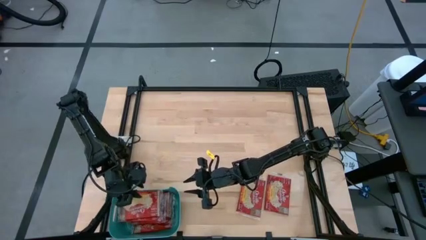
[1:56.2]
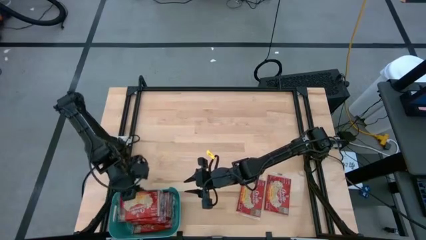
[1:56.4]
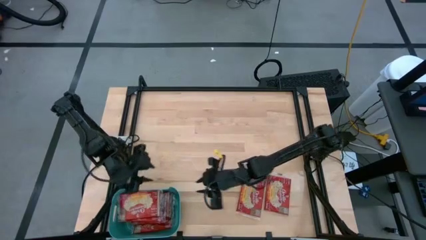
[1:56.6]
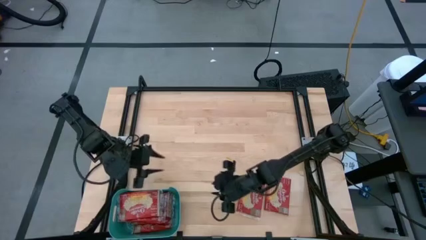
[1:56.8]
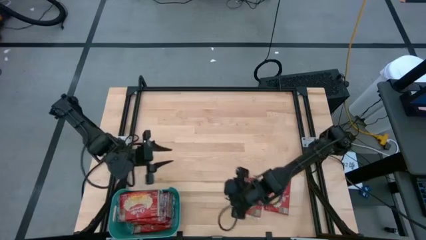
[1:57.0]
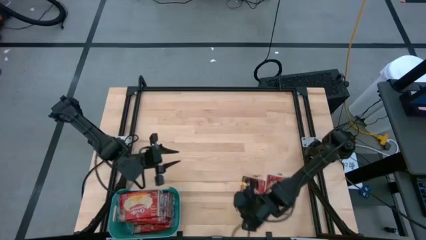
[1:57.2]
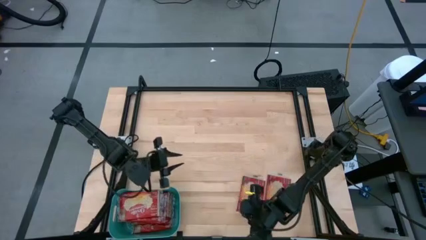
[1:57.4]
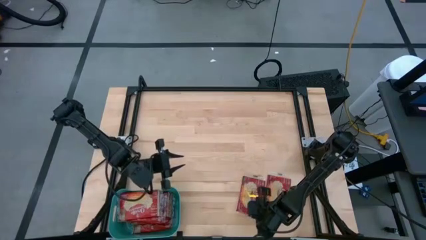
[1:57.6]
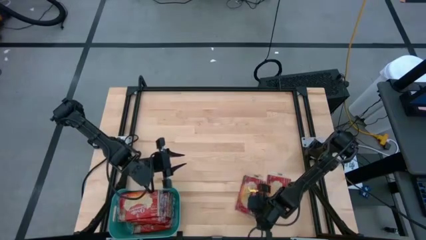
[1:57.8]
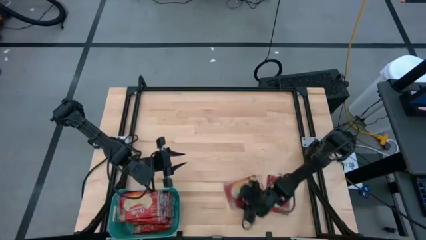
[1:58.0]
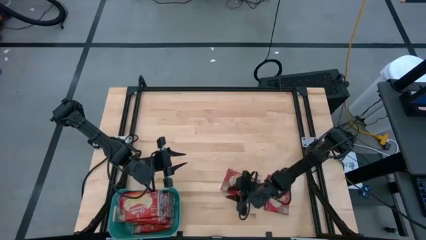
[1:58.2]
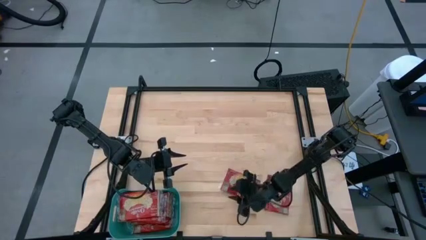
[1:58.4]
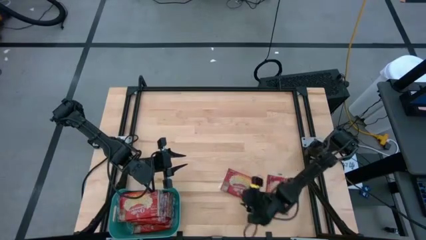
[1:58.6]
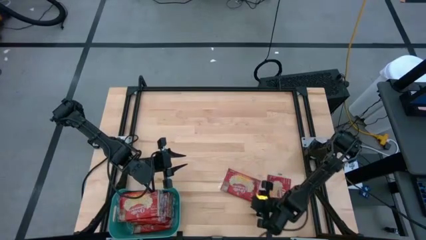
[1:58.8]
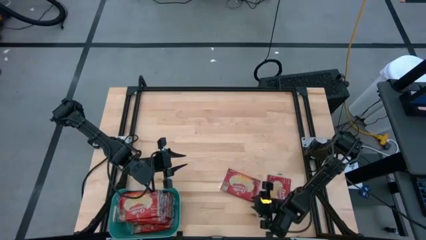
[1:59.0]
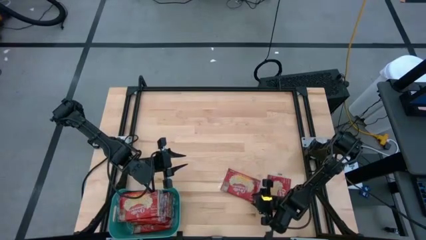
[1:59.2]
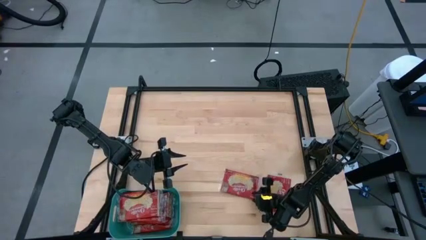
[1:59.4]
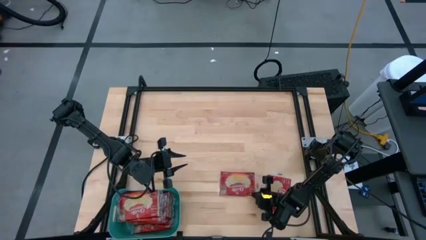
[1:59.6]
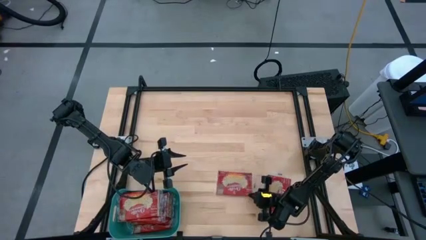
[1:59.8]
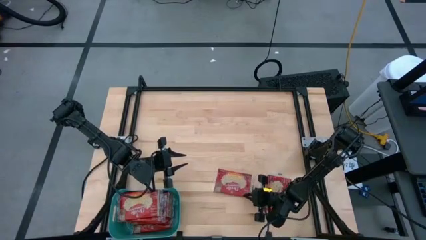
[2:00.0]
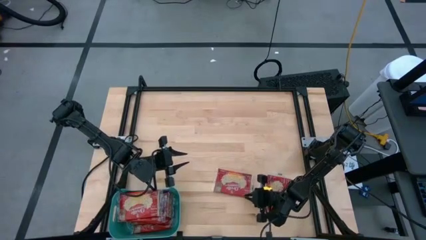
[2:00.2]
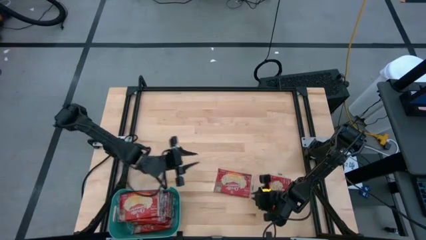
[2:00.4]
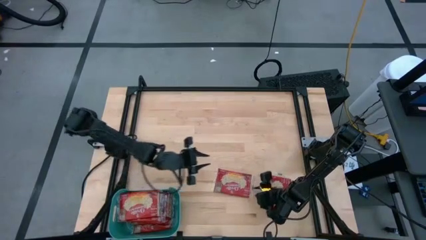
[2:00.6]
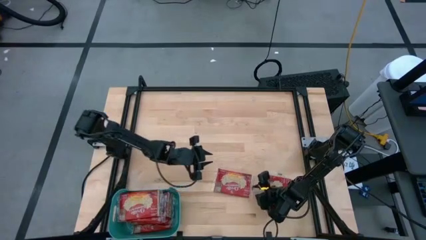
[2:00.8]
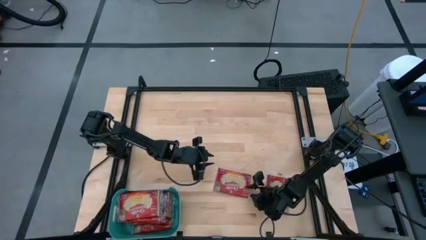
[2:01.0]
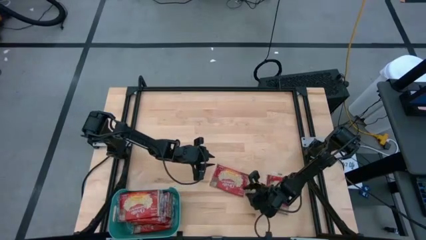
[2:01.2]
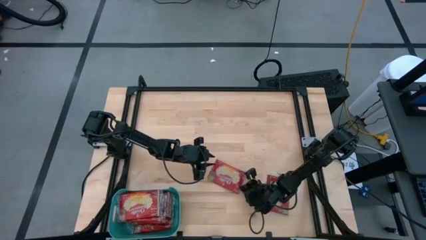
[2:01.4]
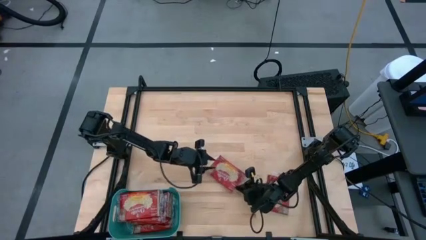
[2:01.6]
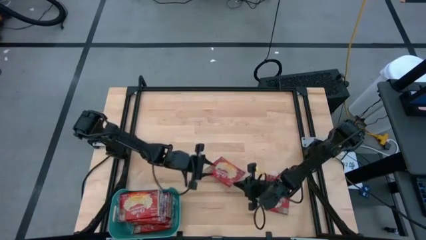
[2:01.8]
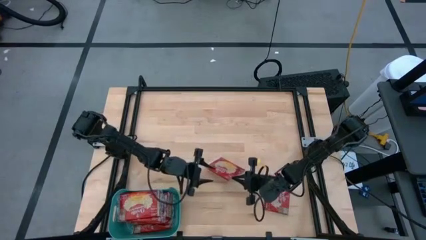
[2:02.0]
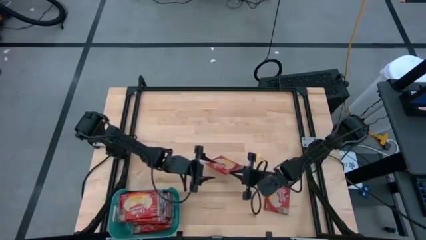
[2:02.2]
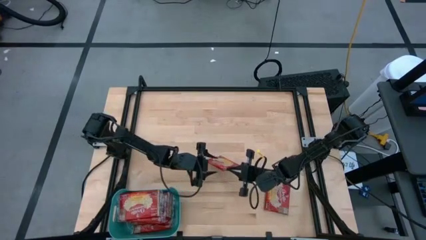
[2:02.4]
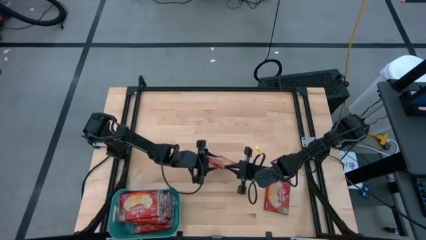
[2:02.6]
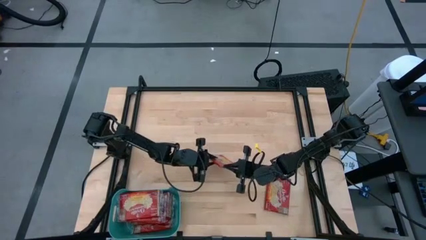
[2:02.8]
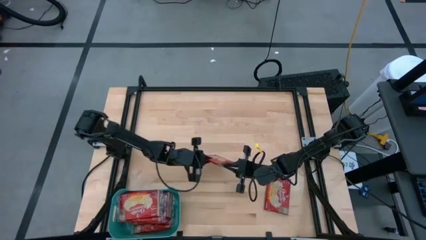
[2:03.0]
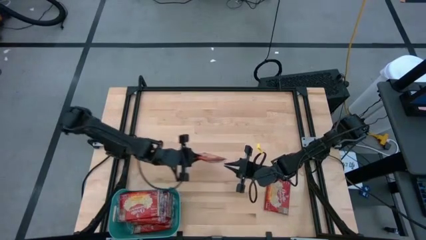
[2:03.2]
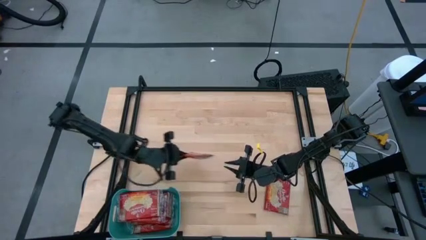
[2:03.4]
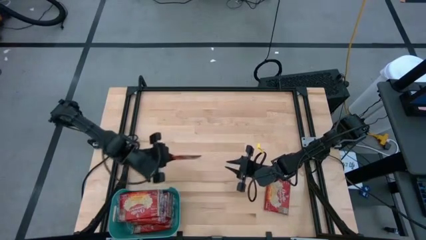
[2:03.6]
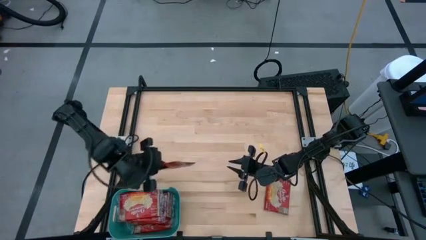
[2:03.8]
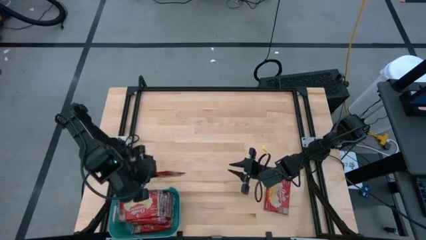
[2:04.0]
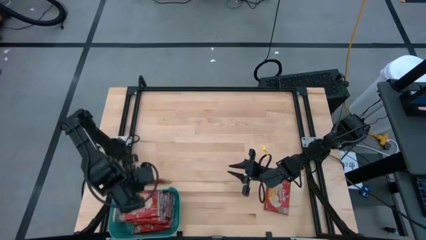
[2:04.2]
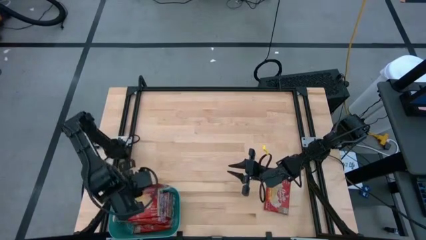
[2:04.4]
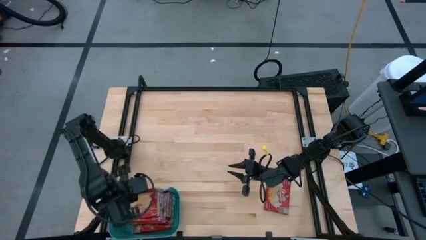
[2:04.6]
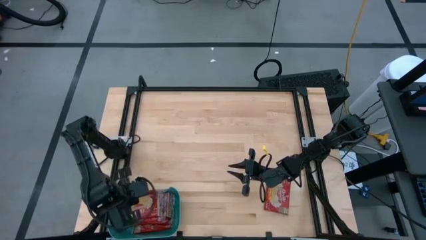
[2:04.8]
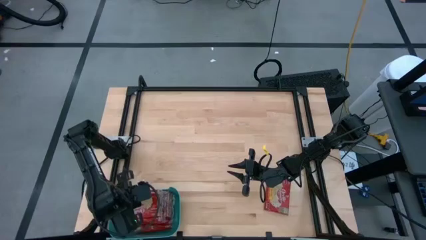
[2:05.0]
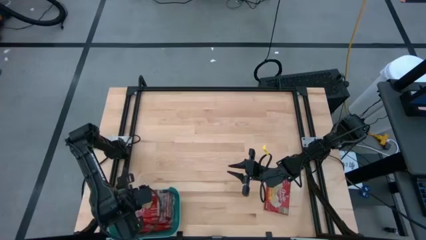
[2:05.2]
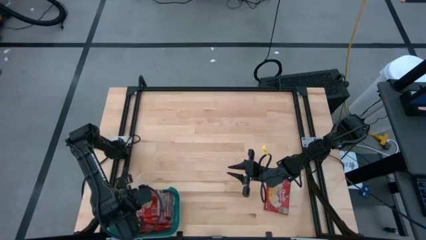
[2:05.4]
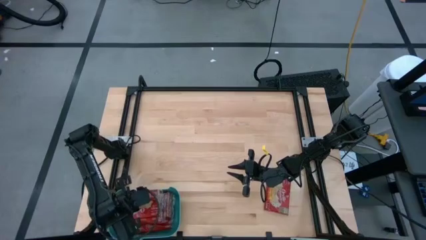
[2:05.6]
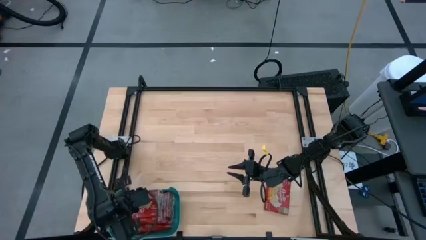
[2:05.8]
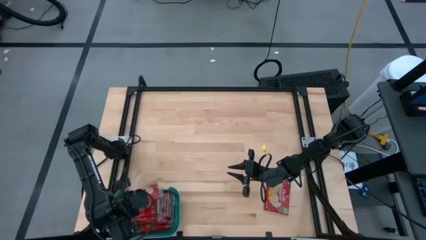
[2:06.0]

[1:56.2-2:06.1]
Task: Sort popcorn bags into baskets
Put the red popcorn bag into the blue container

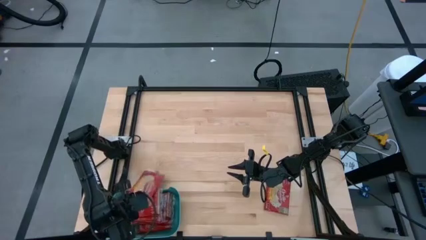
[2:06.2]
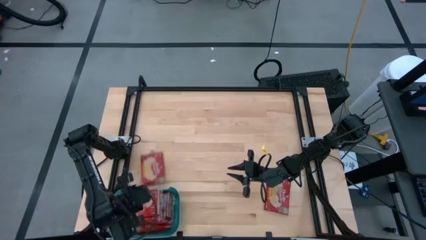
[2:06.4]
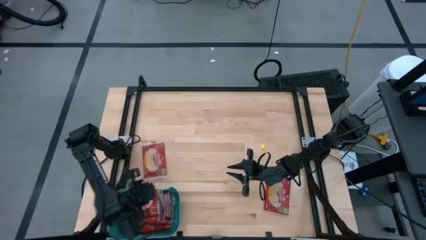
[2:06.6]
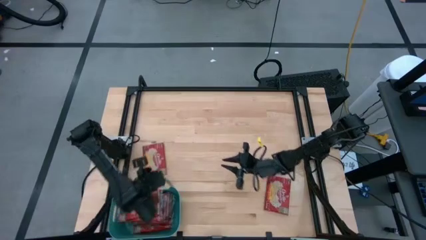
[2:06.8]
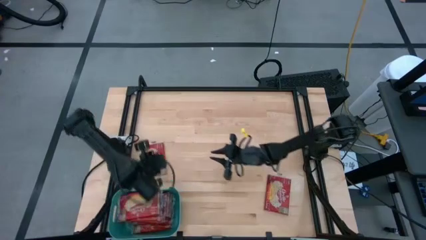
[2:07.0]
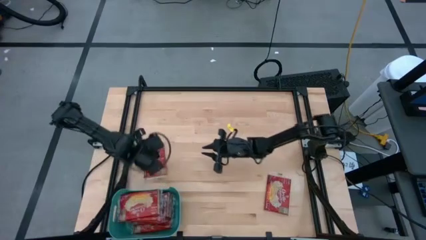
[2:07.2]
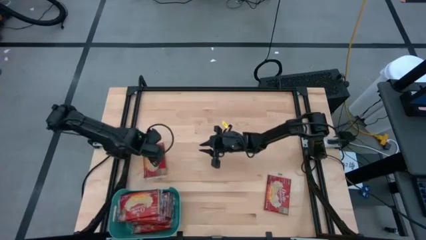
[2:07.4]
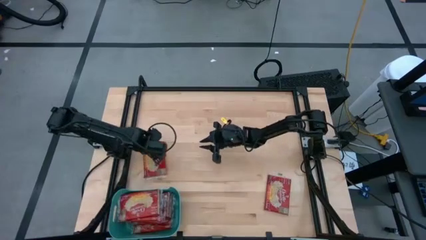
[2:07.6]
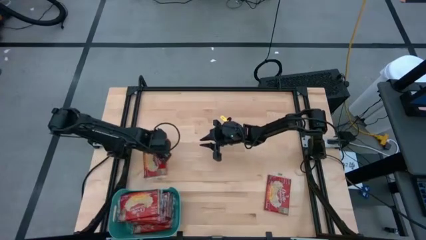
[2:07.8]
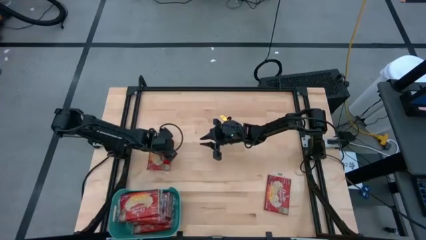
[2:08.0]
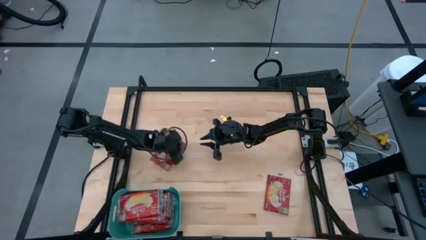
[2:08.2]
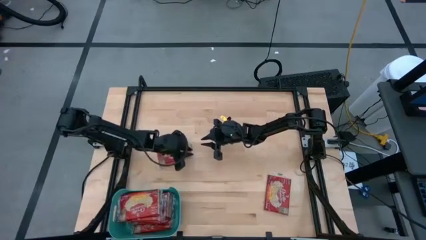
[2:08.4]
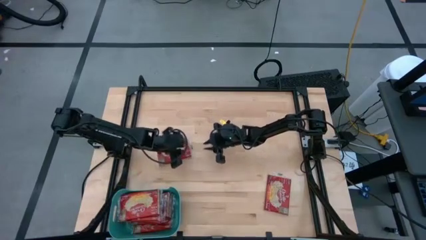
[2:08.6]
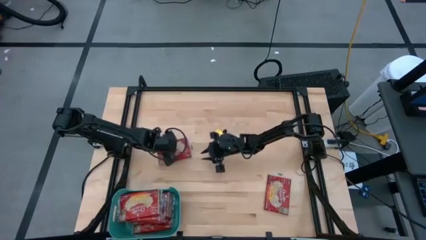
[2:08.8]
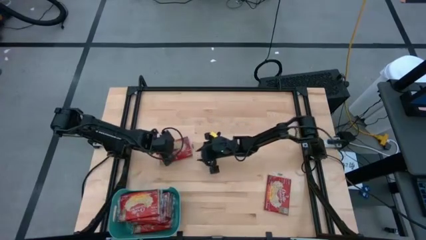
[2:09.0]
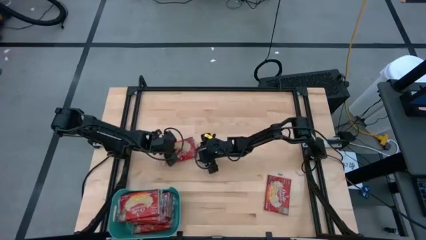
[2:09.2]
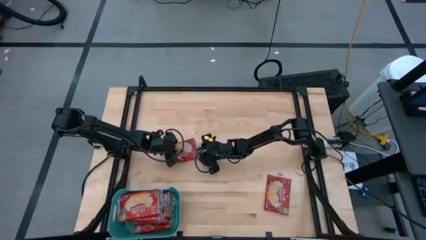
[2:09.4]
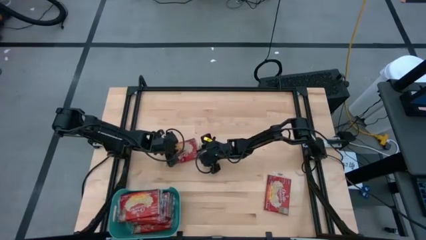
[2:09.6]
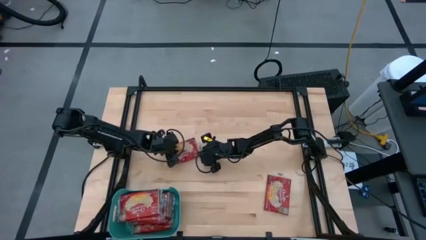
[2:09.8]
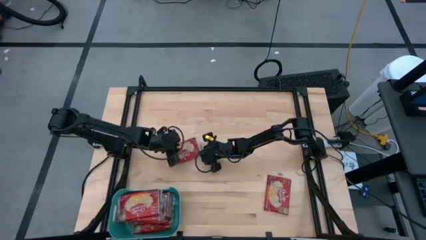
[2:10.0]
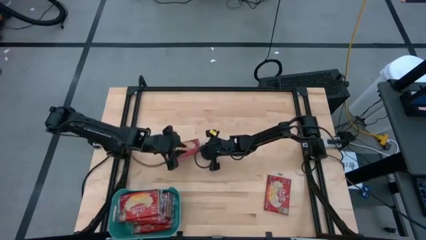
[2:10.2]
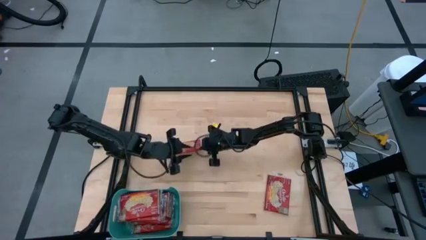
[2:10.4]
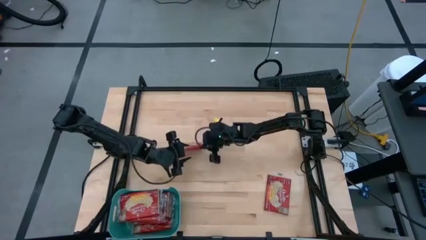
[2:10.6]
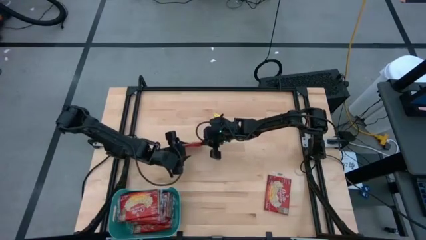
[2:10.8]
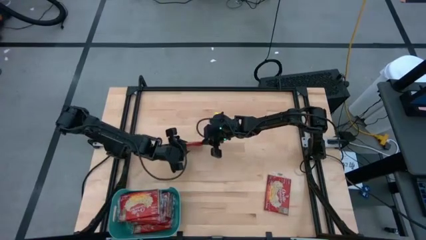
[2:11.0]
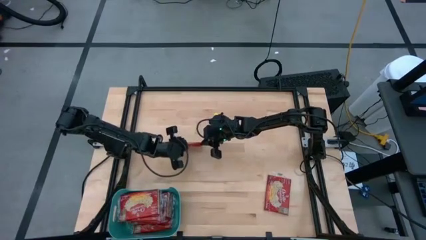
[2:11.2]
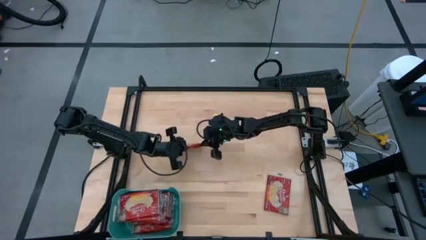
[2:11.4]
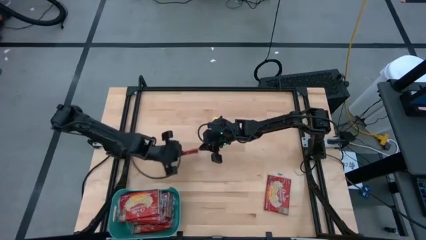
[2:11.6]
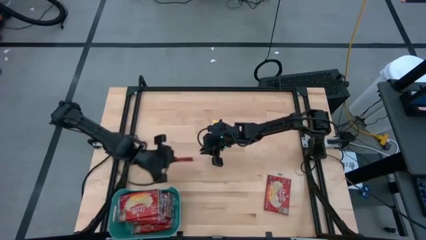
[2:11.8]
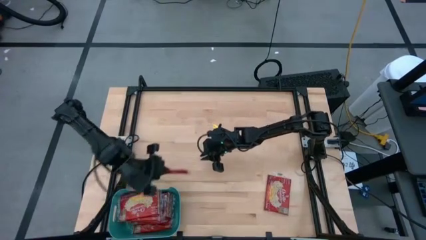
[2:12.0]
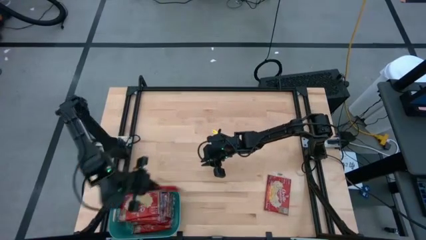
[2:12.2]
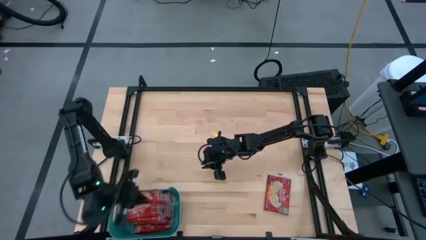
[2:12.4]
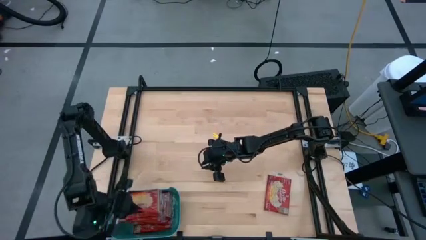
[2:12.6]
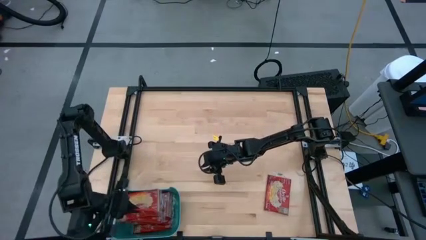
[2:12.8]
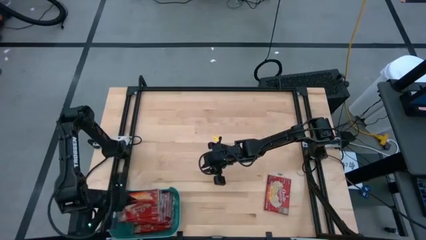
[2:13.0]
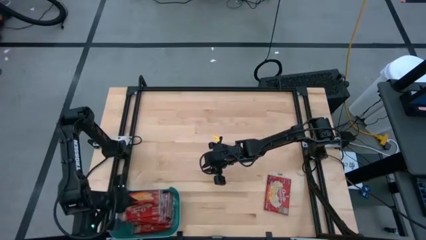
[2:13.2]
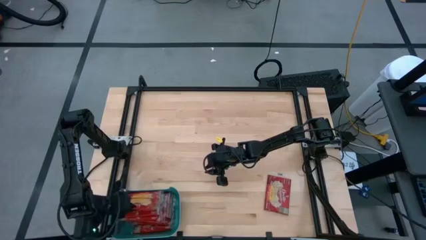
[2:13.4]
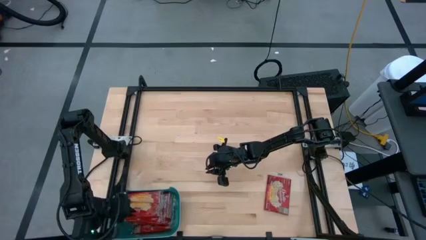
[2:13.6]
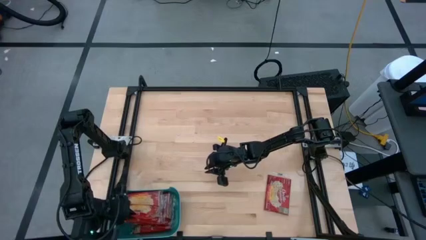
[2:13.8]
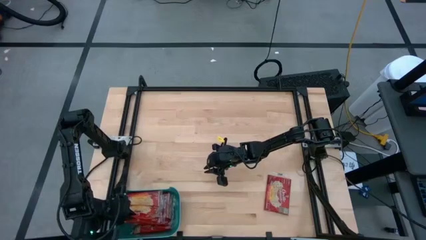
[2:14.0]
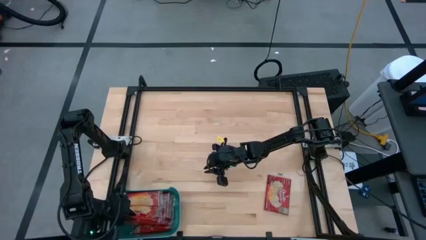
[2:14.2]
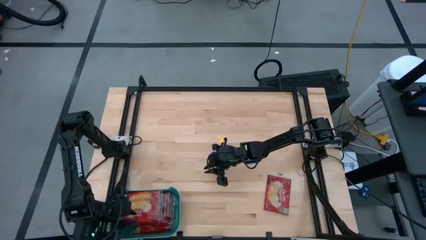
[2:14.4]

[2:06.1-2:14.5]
Put the red popcorn bag into the blue container
